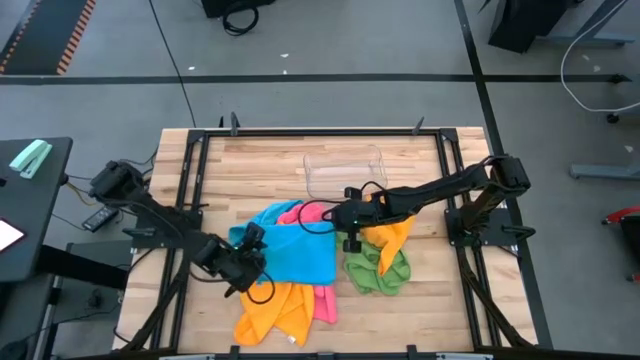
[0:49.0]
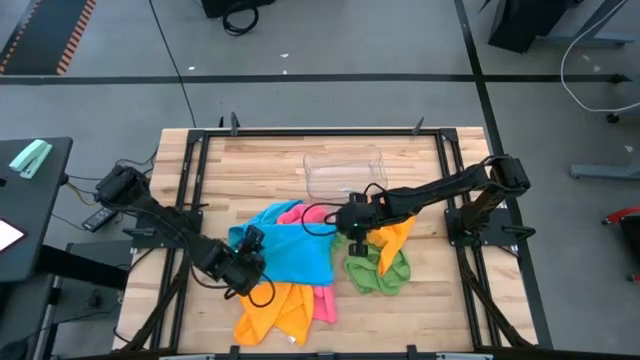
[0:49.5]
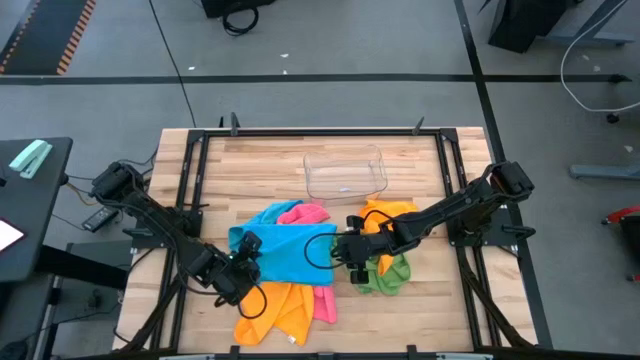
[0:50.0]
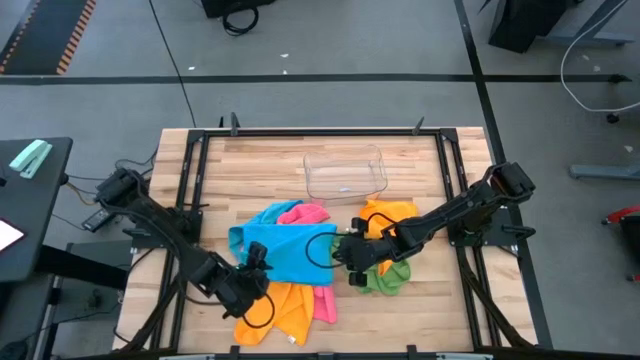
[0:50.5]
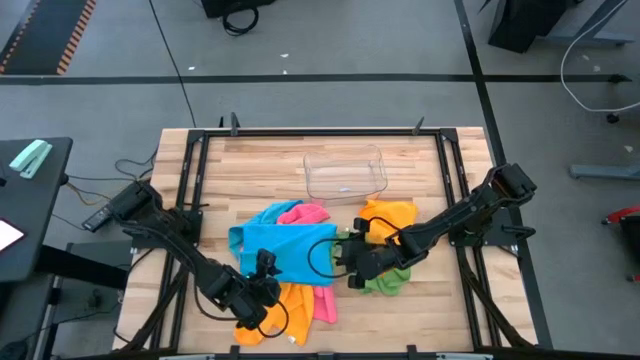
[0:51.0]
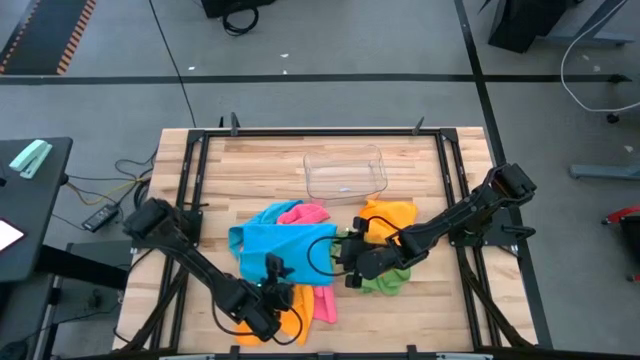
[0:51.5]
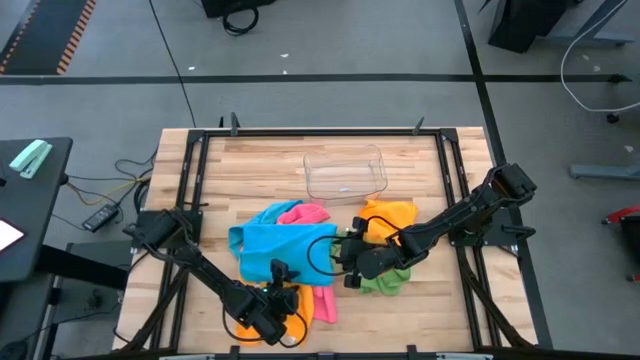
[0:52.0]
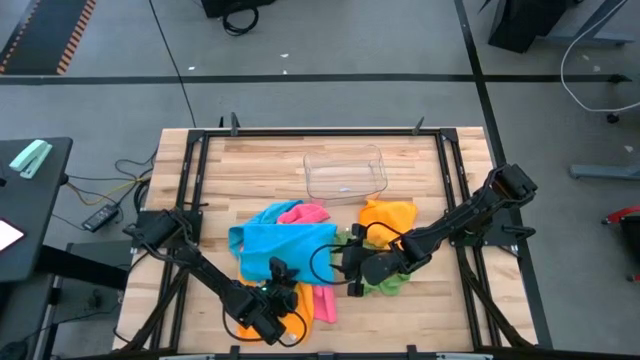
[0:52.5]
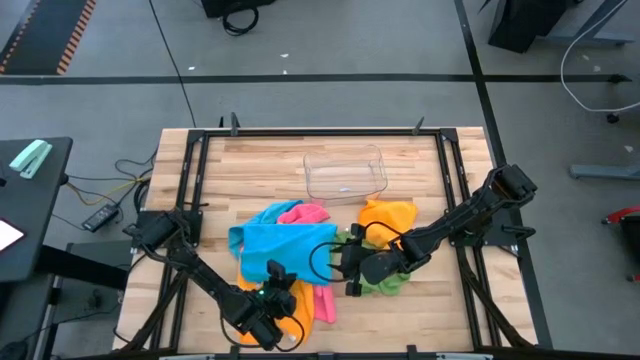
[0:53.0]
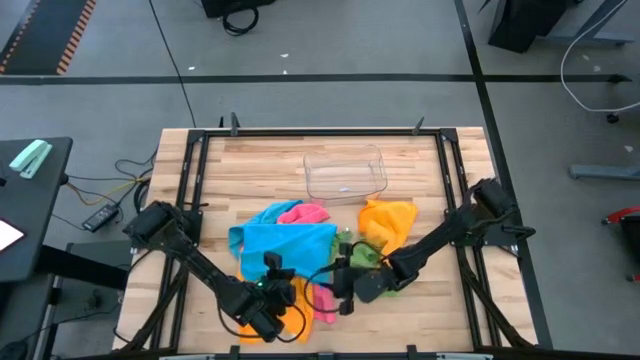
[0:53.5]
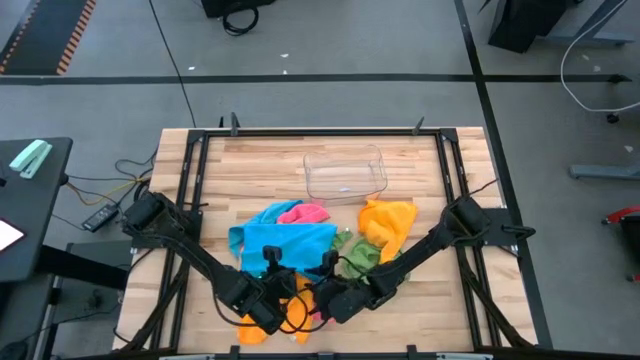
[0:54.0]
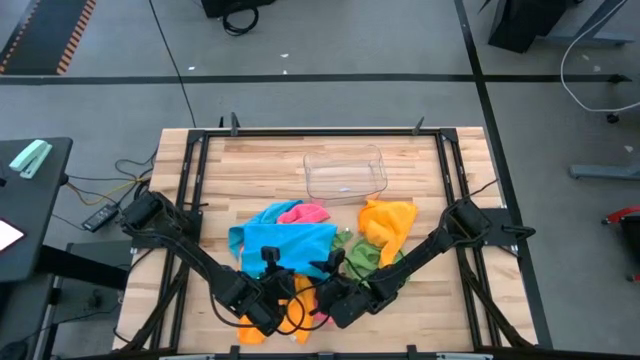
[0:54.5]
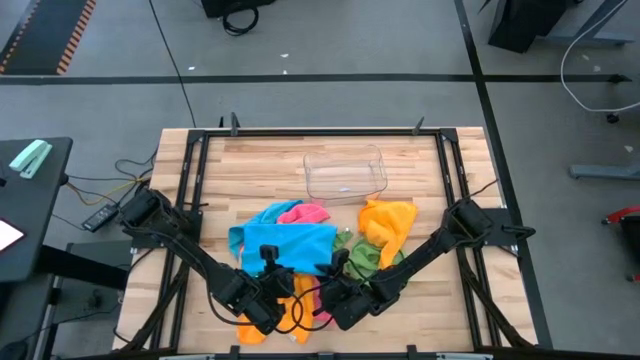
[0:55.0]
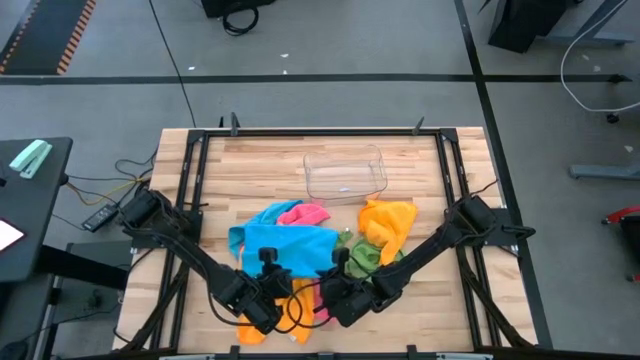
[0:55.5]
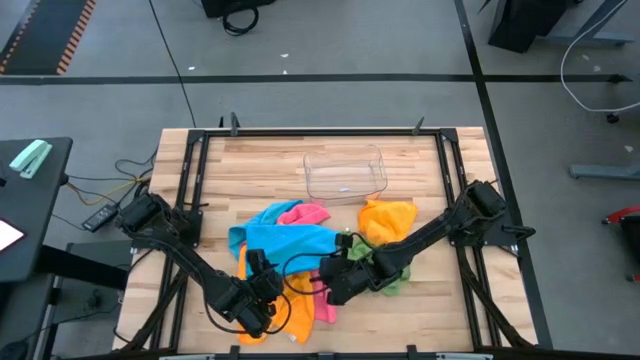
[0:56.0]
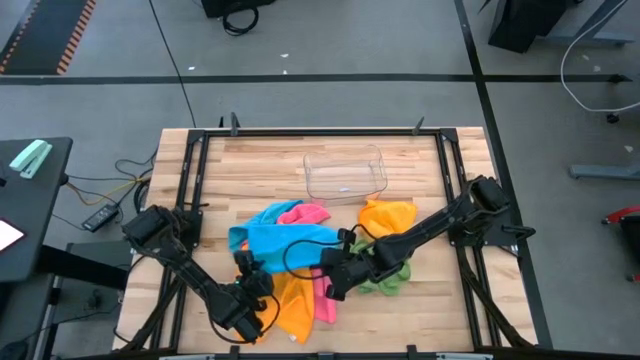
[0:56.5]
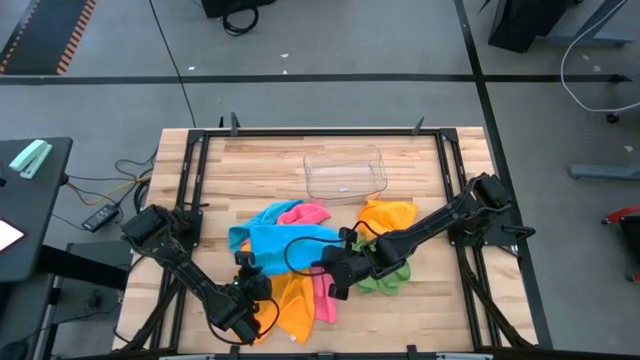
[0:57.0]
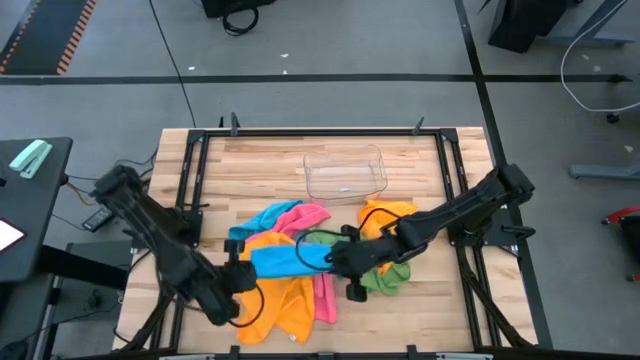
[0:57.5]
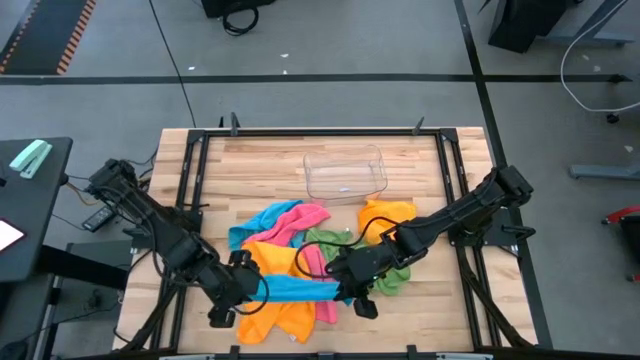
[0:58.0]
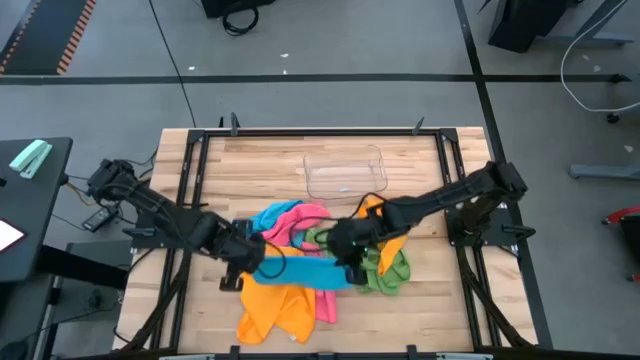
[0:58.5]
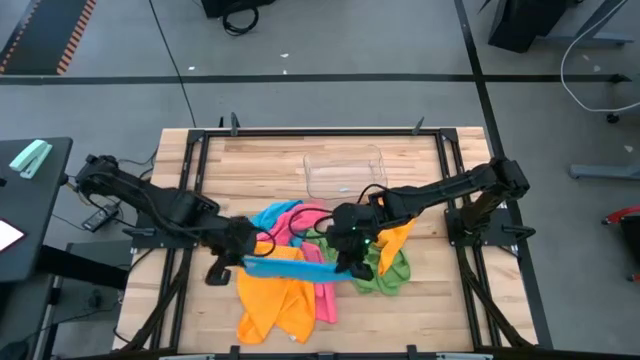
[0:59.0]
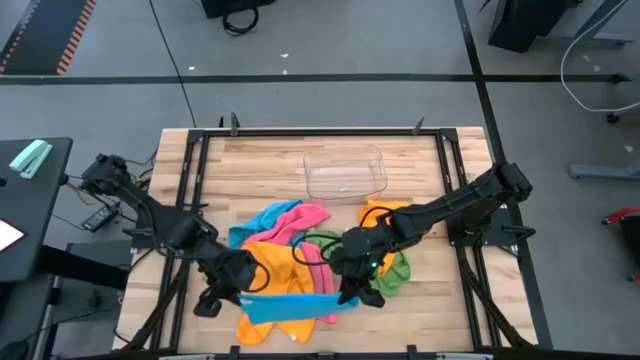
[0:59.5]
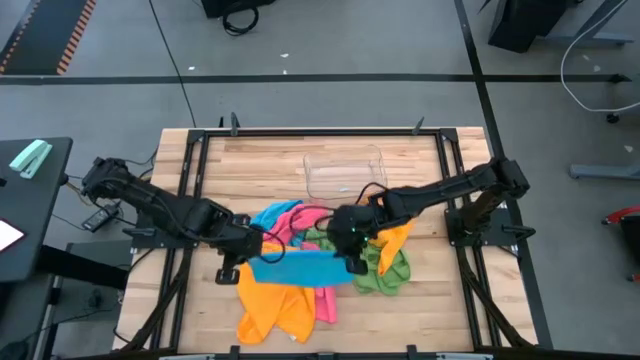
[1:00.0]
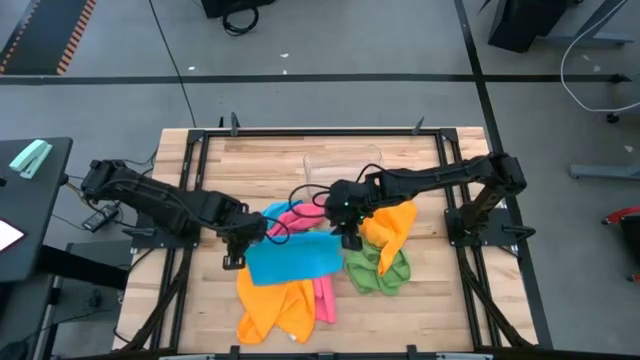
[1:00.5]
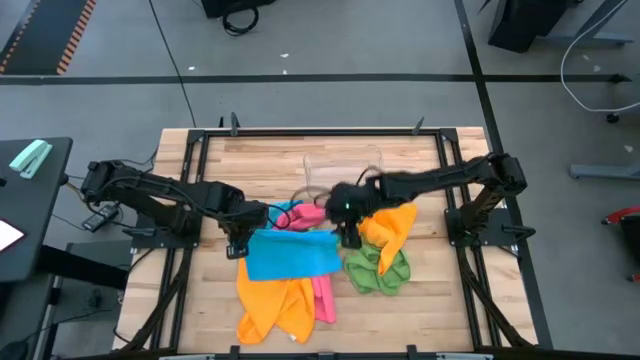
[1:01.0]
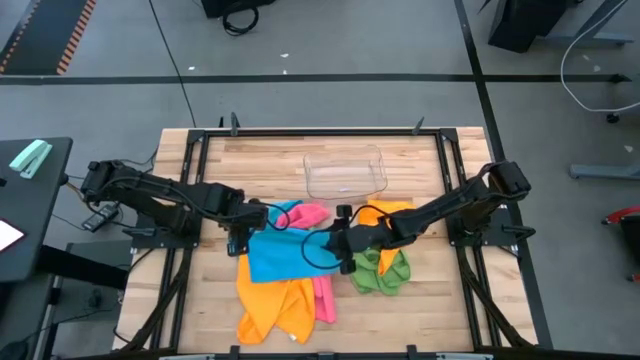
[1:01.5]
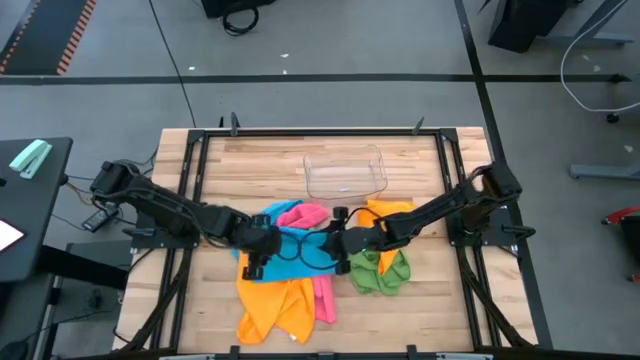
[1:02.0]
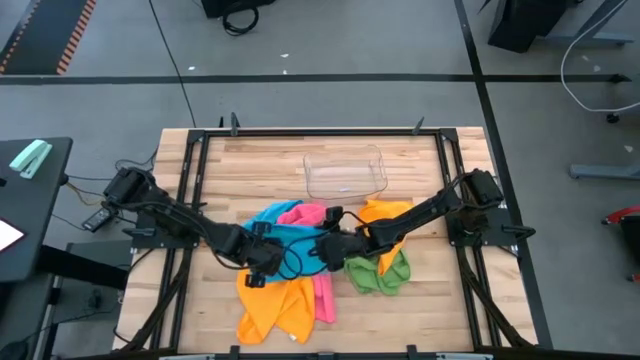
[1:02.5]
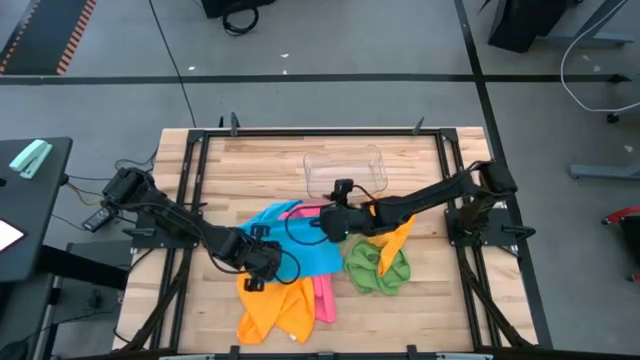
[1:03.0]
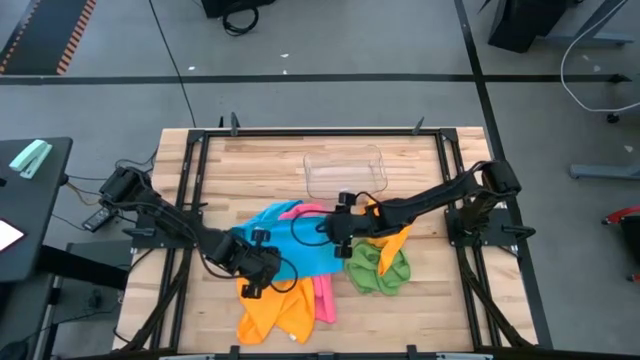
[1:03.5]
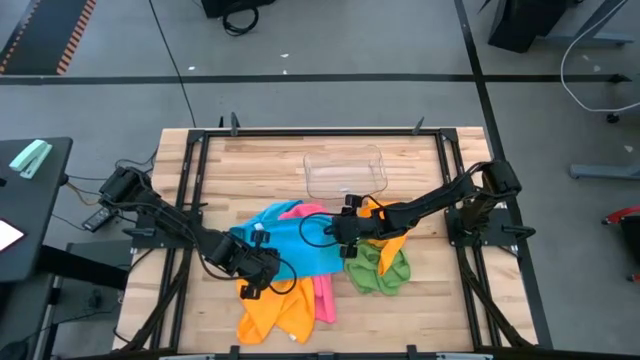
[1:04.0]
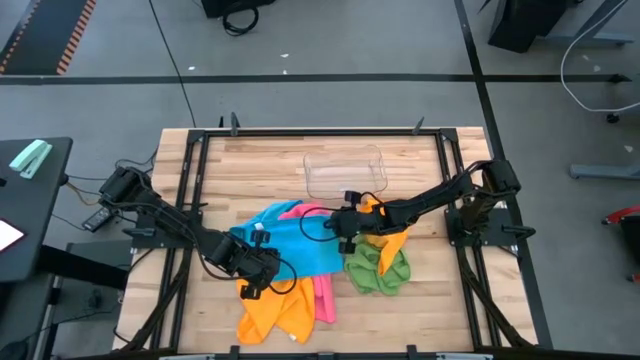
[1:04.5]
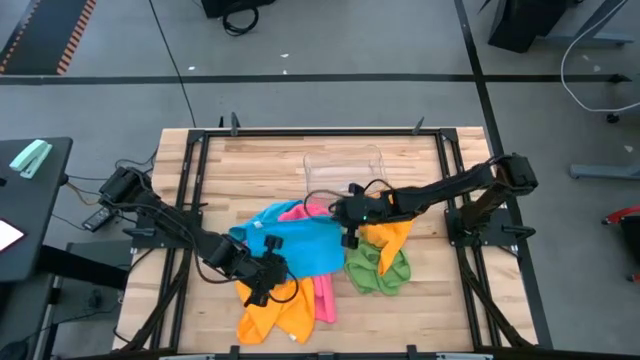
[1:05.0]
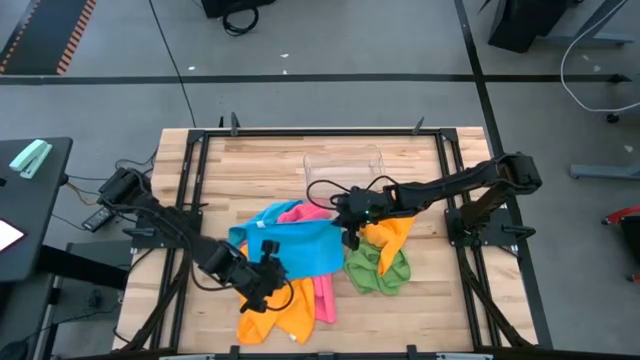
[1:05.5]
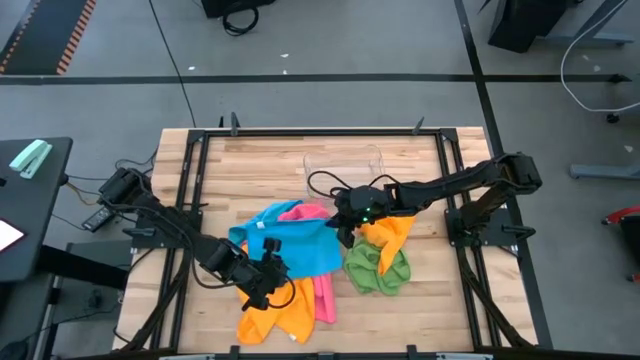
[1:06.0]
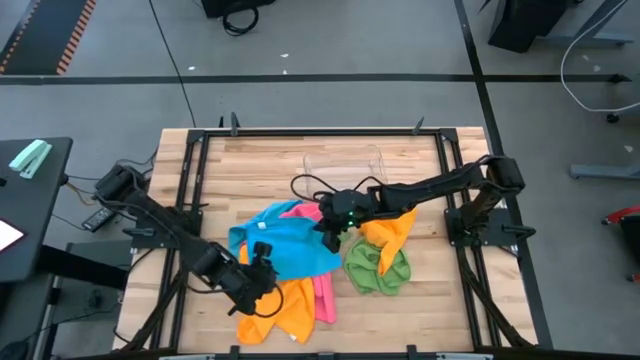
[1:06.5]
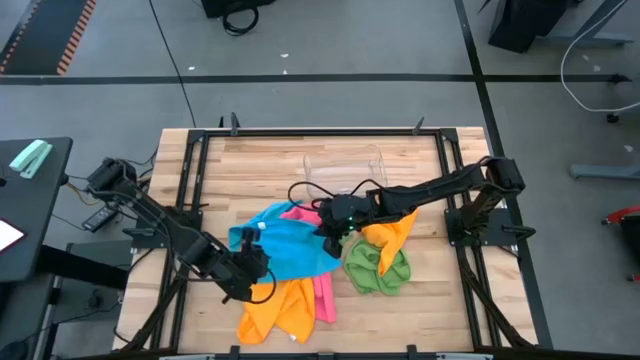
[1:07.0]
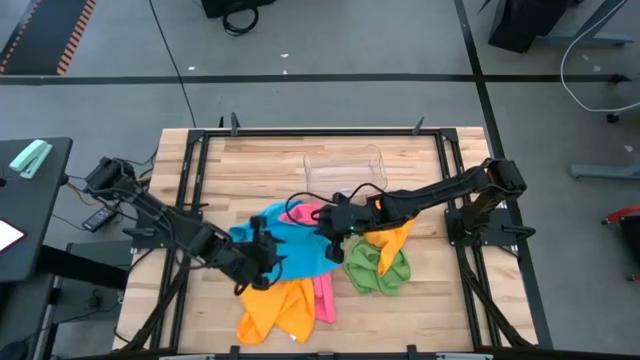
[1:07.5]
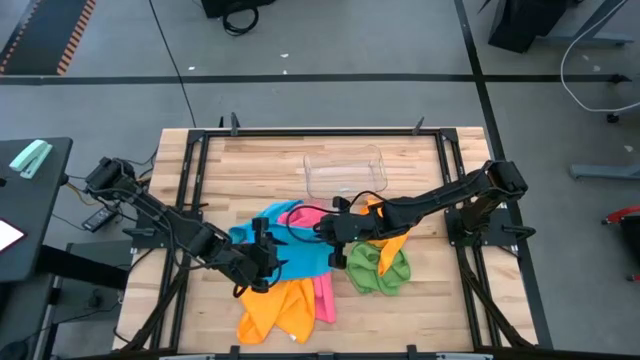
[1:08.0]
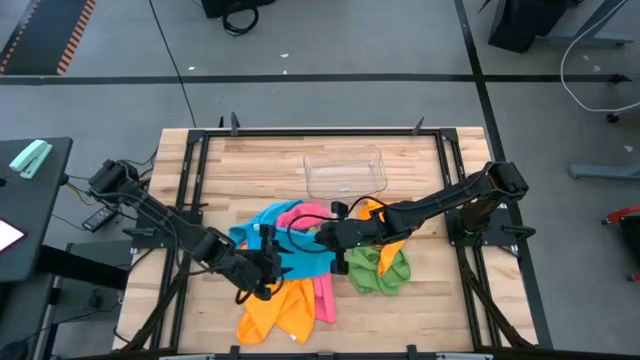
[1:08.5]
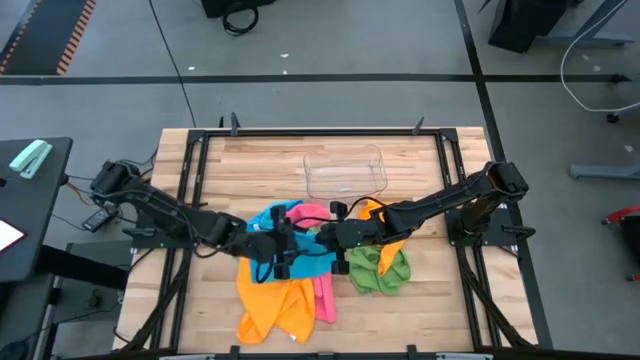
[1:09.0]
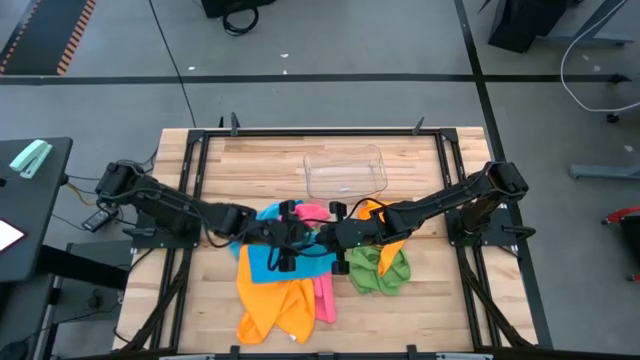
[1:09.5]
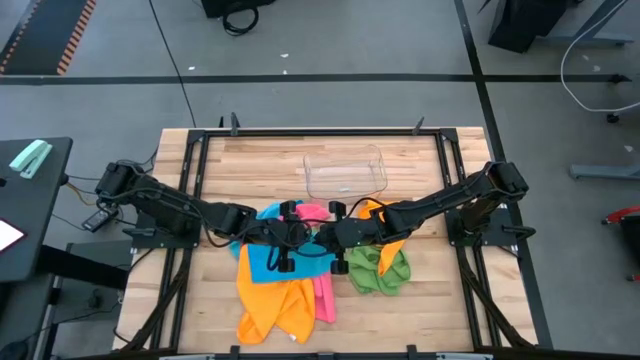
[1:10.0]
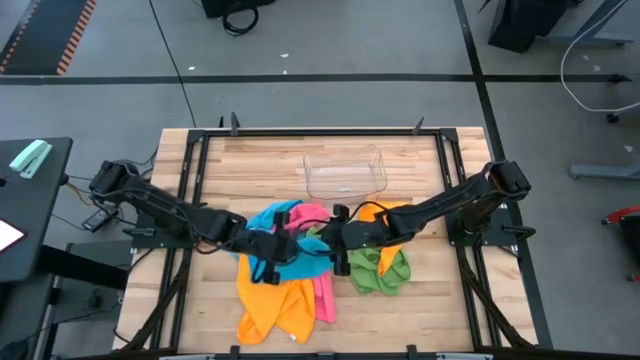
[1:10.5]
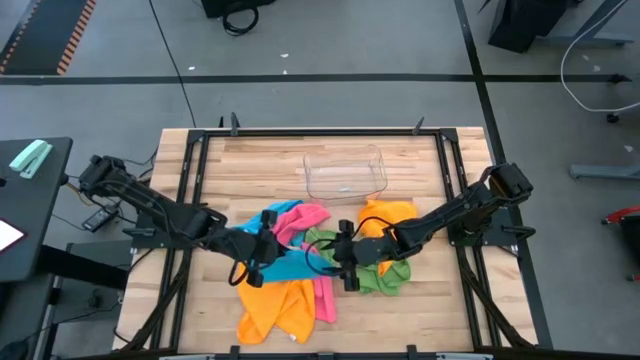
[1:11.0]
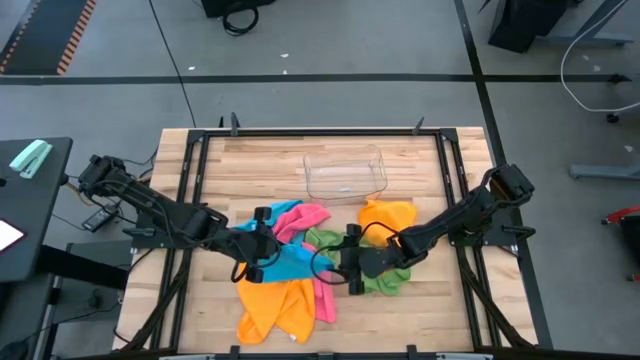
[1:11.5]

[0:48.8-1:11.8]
Task: Fold microfiber towels
Fold the bottom blue microfiber cloth
